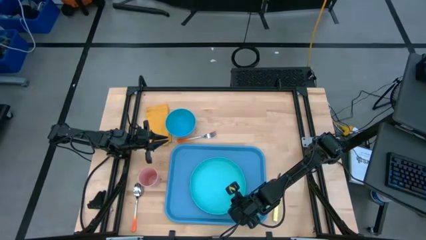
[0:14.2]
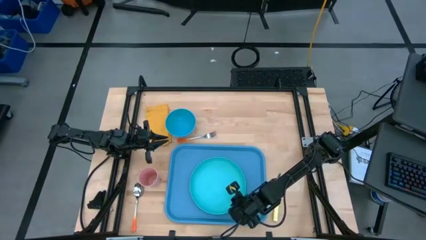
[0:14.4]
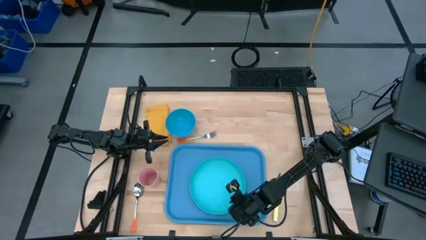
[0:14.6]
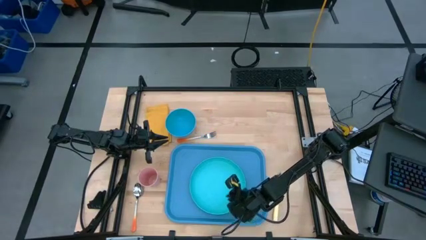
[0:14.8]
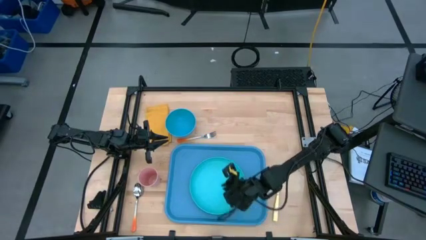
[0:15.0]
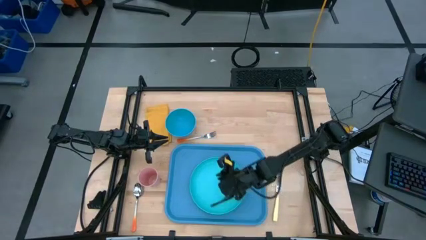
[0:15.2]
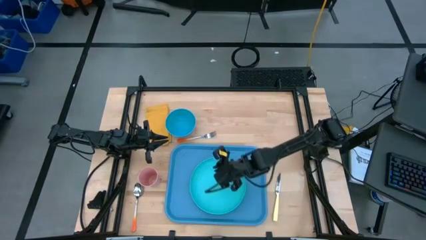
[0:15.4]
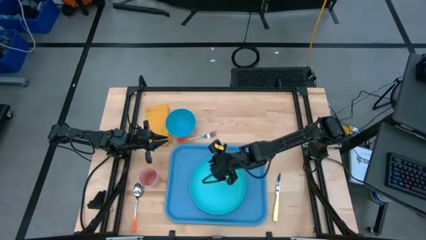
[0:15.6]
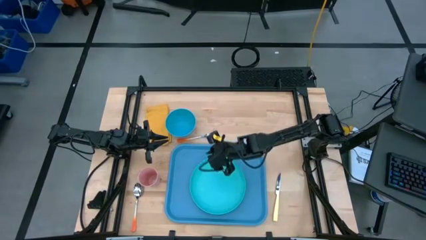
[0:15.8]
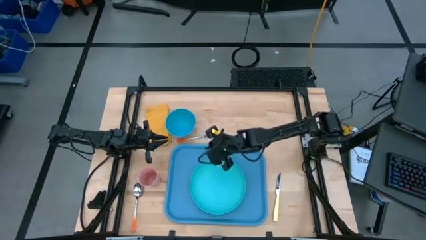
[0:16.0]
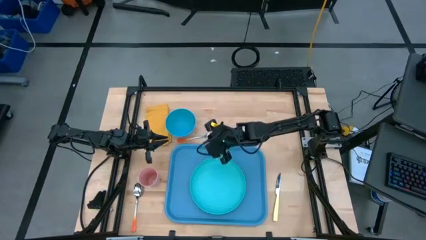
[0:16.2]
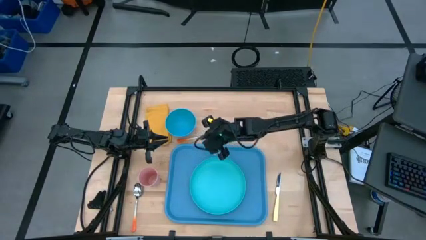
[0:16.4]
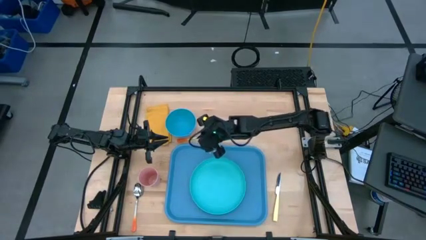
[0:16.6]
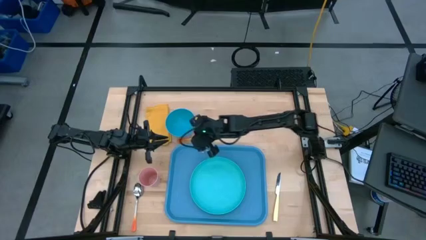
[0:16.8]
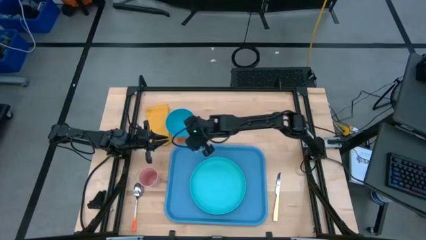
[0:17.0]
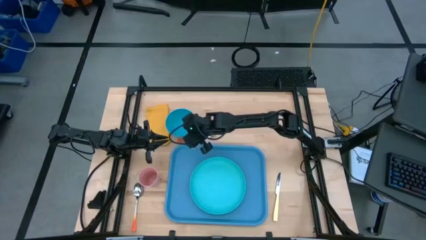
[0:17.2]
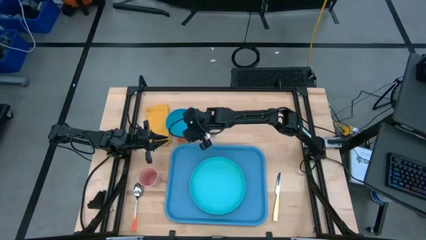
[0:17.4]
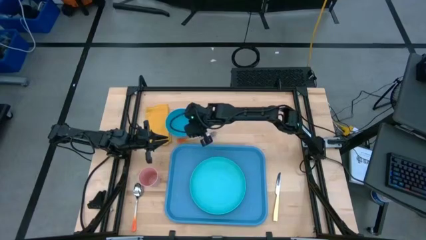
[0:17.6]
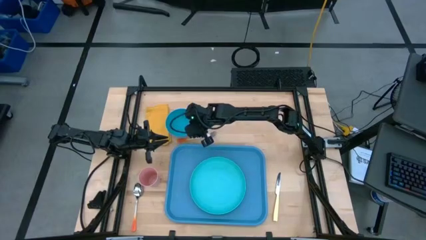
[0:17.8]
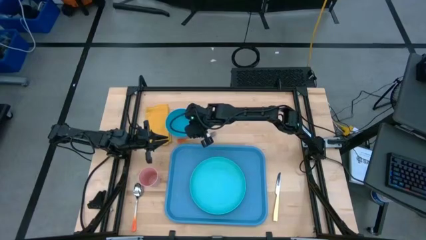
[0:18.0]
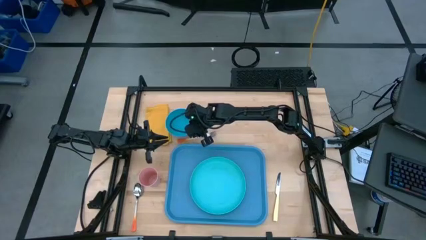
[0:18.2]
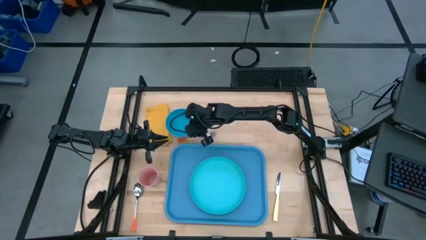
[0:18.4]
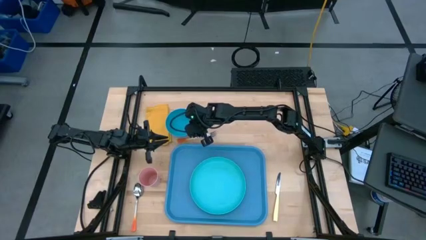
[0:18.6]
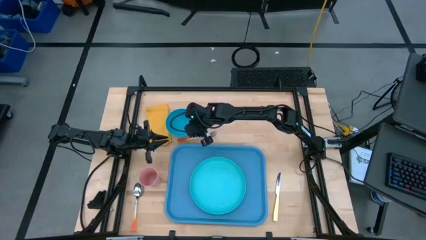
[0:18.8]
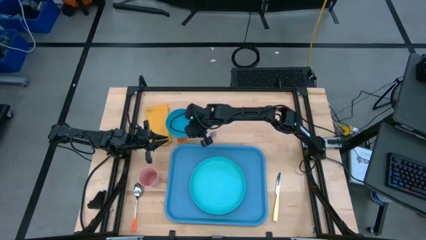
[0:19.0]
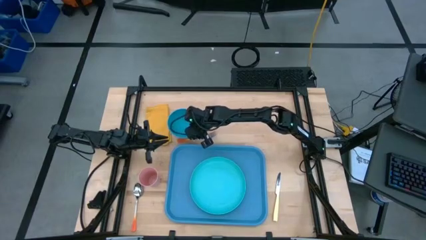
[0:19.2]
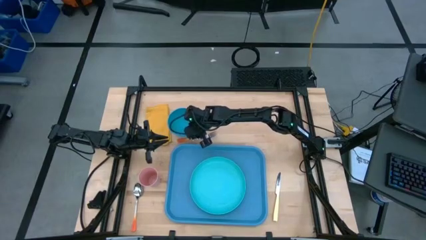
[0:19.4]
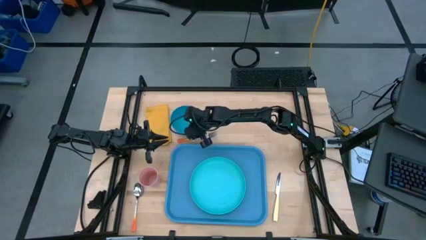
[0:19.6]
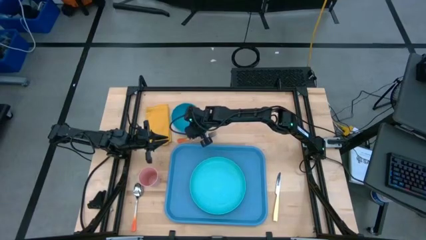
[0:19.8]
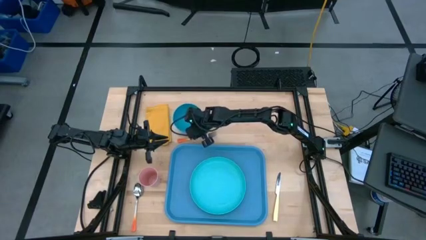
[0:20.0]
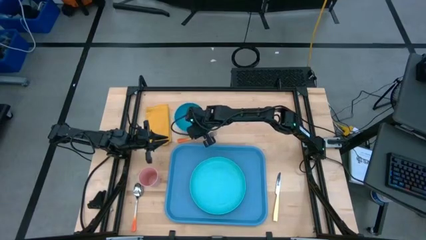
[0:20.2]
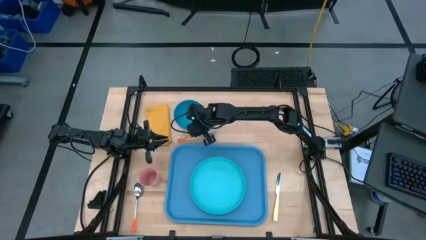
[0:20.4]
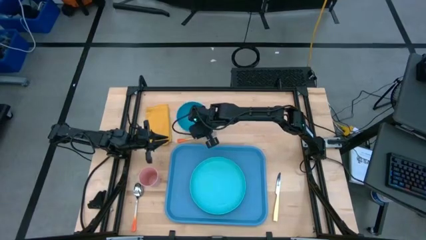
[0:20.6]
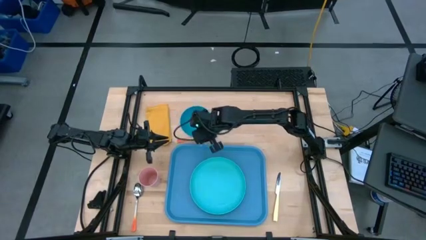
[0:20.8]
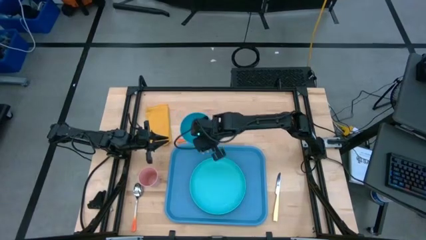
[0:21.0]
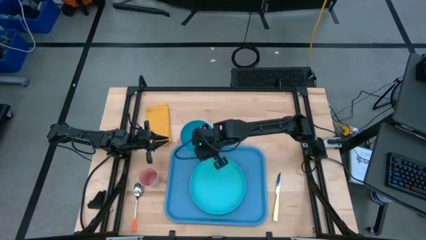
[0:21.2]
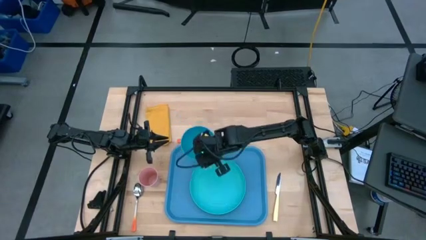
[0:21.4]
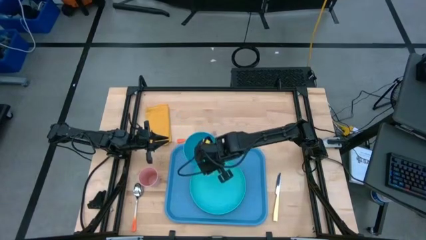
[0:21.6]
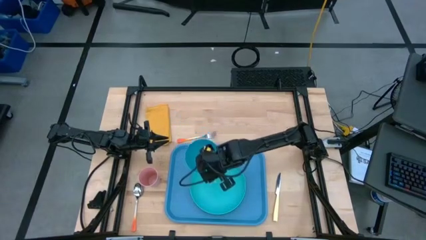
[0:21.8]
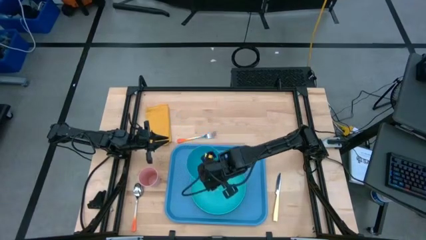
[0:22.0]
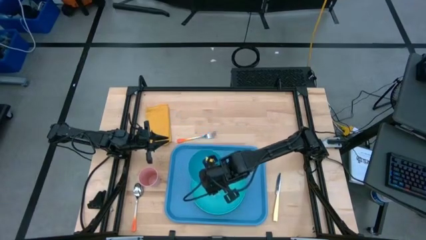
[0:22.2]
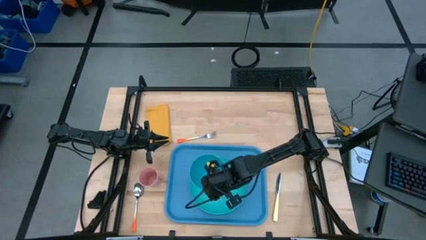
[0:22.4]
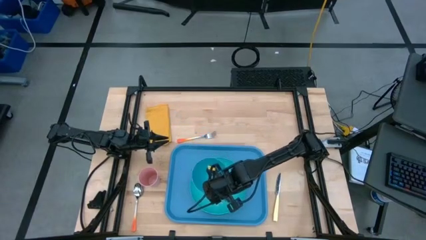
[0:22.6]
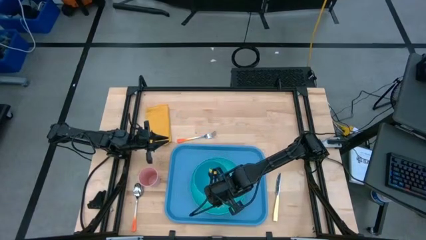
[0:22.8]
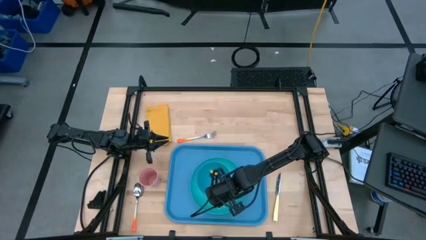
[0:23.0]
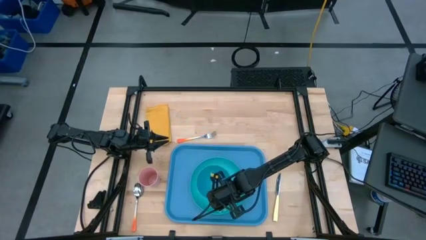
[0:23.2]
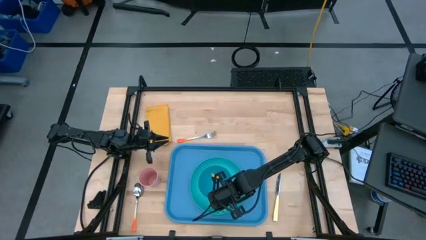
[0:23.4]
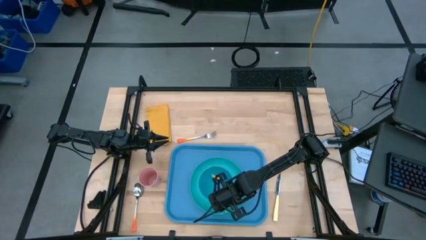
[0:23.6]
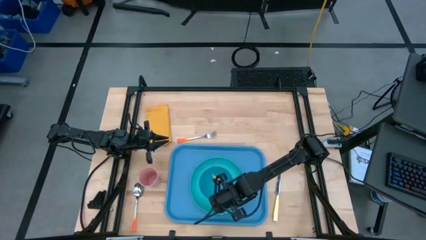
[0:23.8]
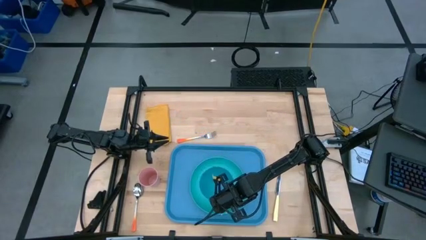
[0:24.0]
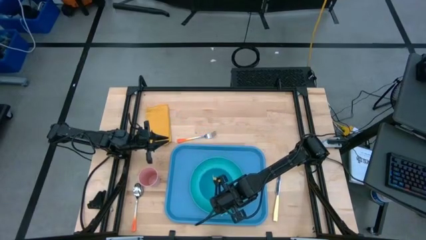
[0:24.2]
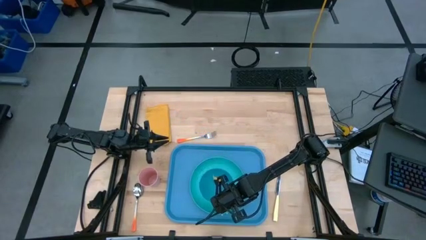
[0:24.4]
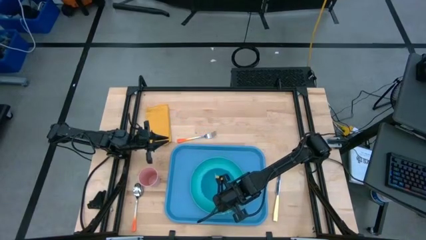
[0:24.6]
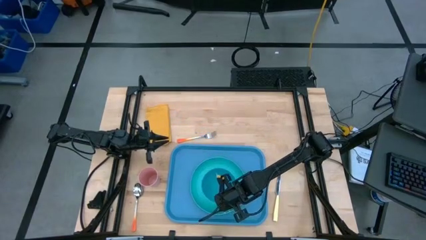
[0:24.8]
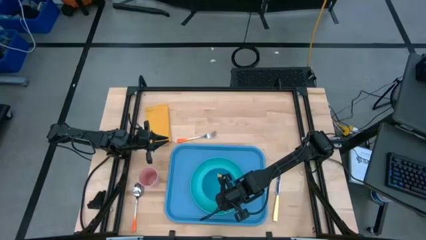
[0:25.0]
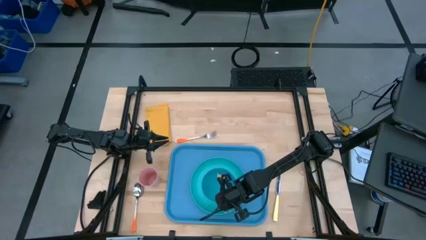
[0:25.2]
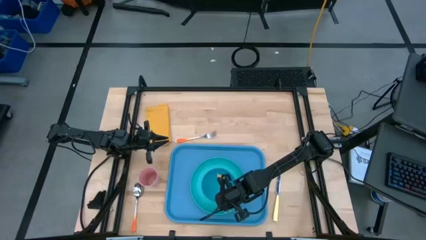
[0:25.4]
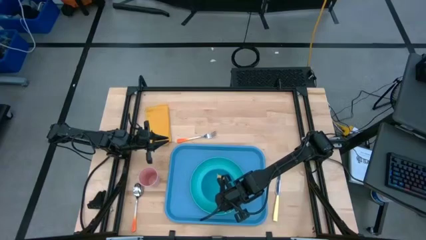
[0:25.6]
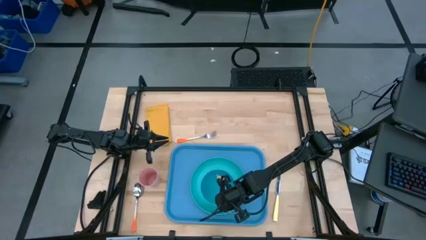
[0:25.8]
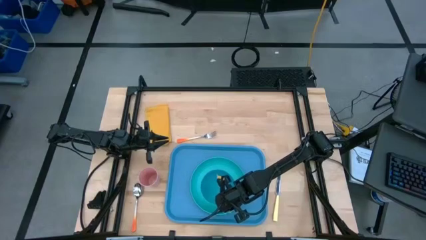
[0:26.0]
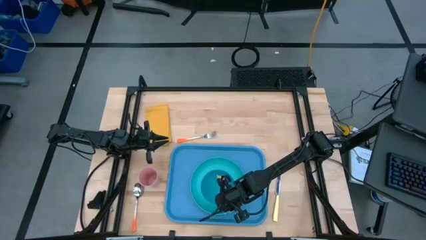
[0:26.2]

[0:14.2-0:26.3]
Task: Set up tray
Put the blue bowl on top of the light blue plate

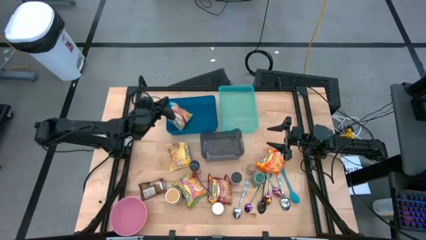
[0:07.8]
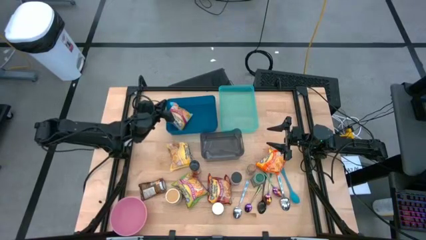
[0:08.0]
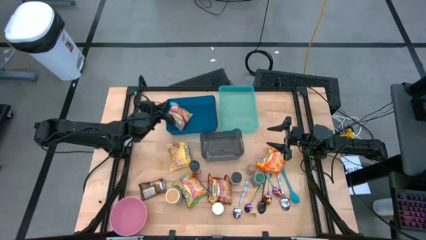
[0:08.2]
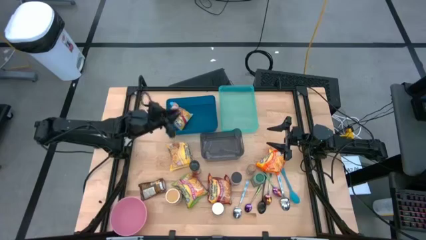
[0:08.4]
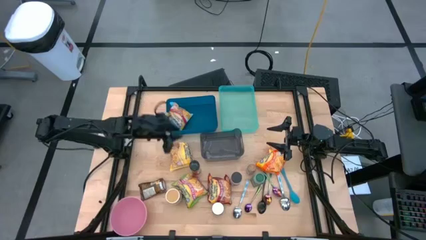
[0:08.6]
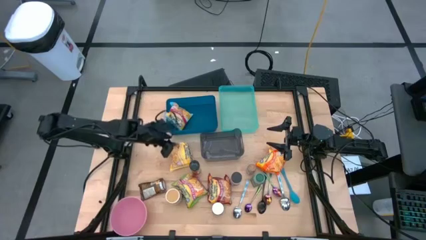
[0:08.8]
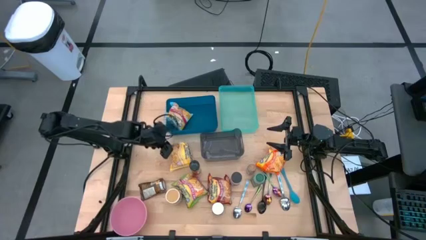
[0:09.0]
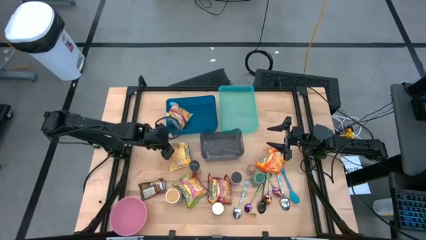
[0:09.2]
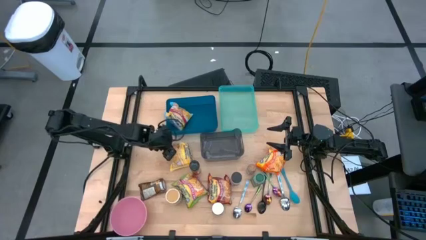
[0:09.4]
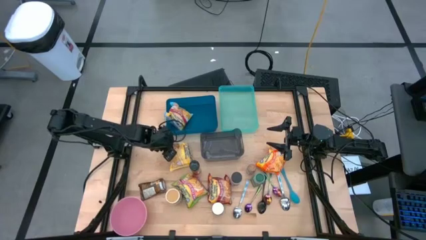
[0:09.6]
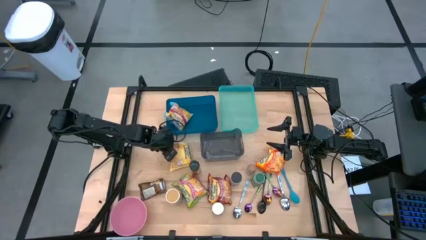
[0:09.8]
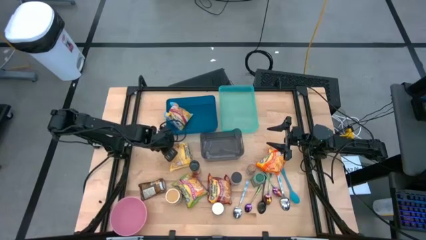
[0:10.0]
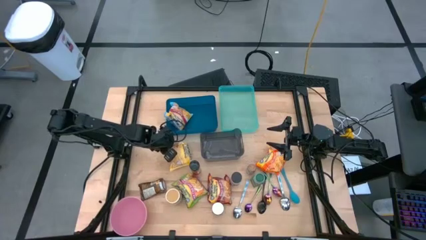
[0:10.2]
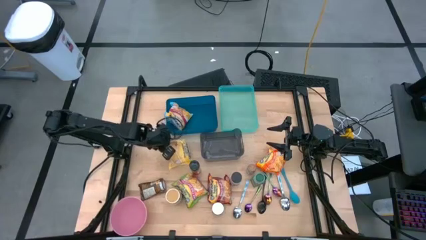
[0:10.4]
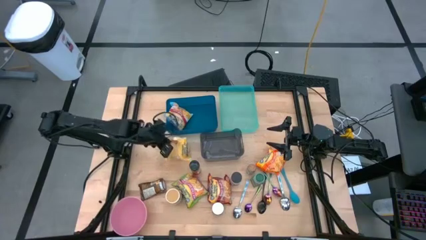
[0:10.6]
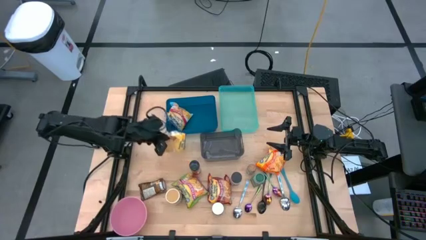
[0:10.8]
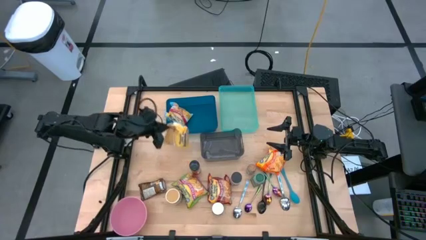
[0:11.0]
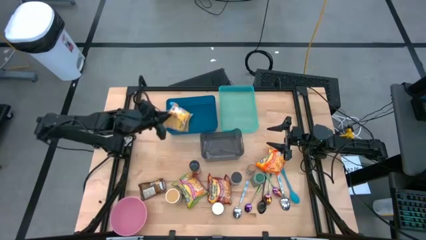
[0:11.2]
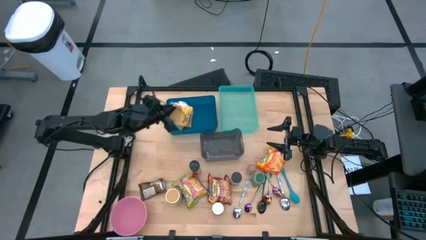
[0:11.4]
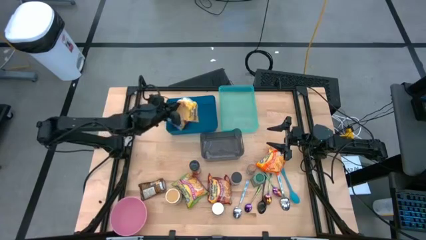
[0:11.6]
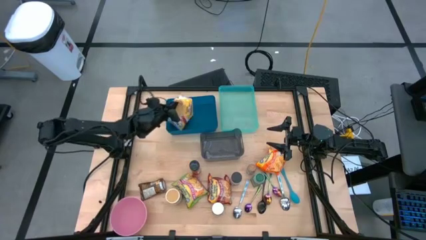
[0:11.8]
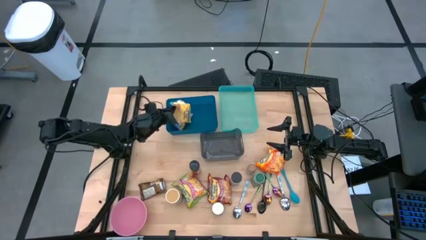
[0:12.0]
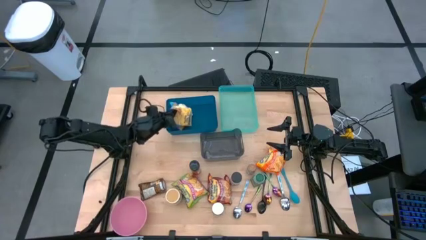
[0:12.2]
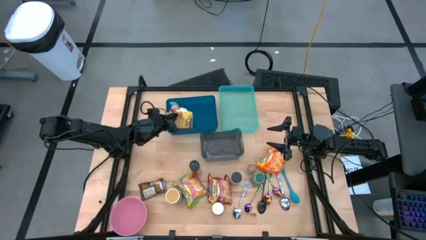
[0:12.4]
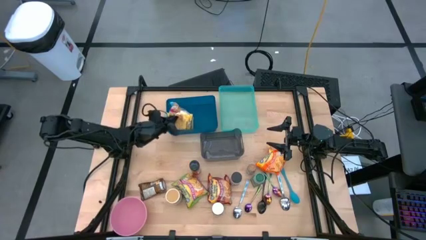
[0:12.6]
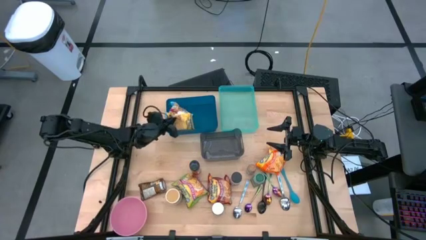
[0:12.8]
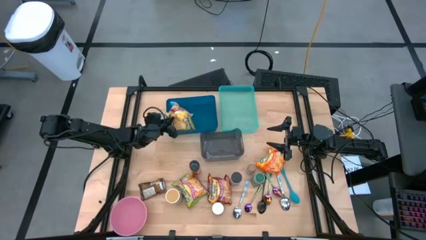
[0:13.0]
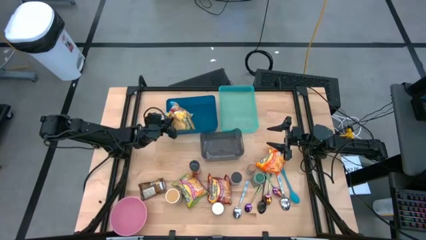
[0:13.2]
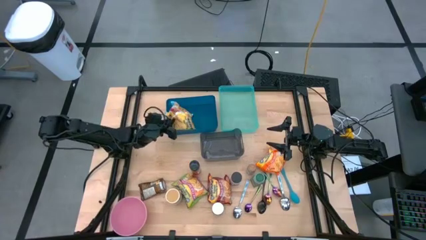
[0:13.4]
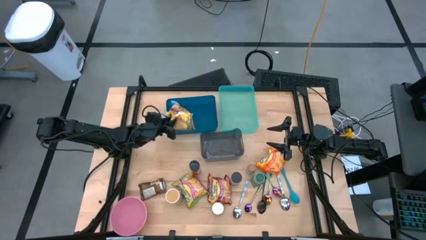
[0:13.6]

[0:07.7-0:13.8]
Task: Pick & Place Food Item
Put the yellow noodle pack into the blue bin
